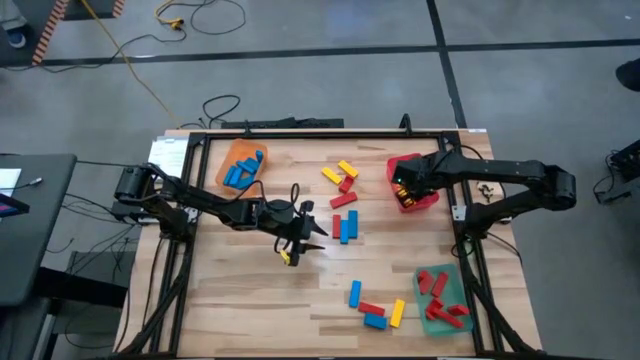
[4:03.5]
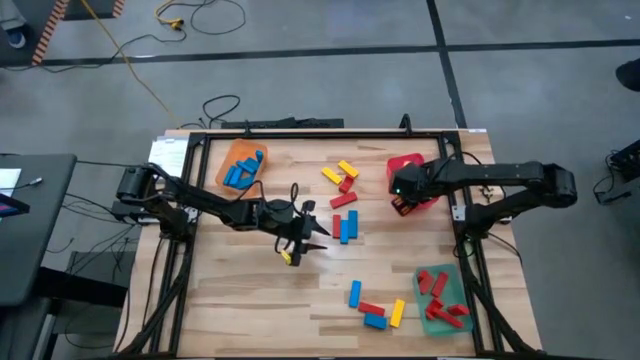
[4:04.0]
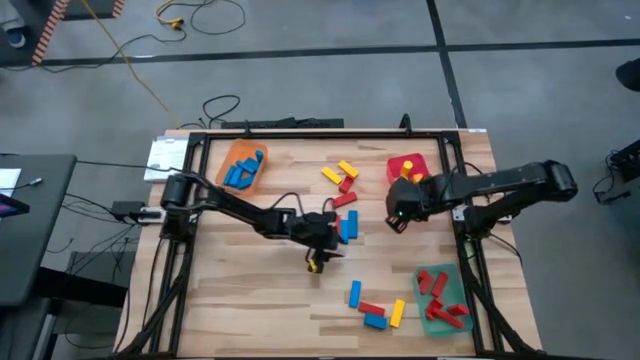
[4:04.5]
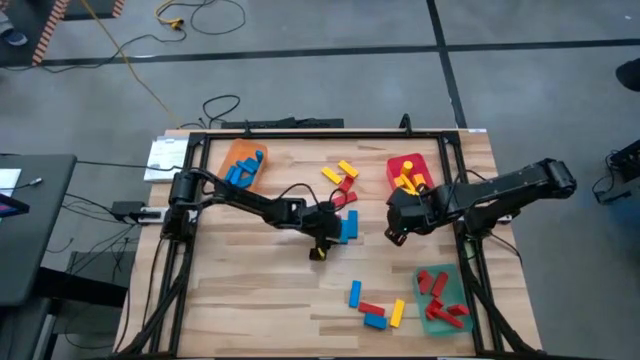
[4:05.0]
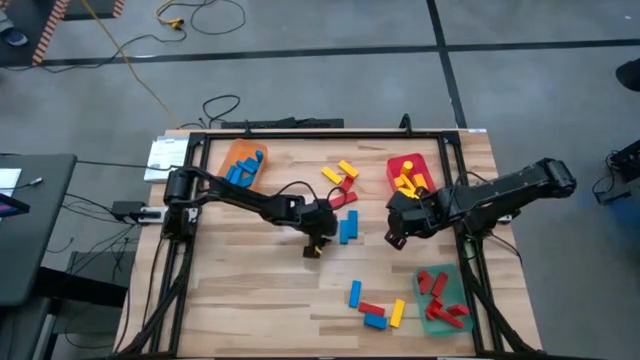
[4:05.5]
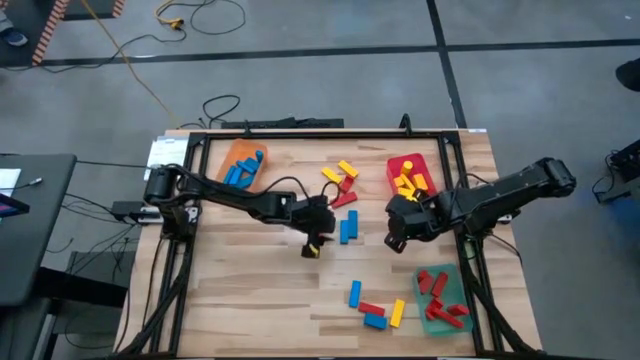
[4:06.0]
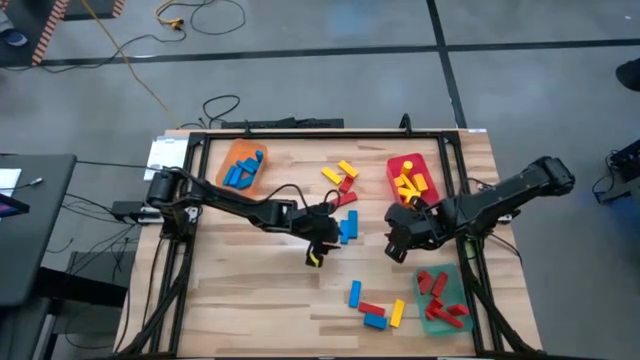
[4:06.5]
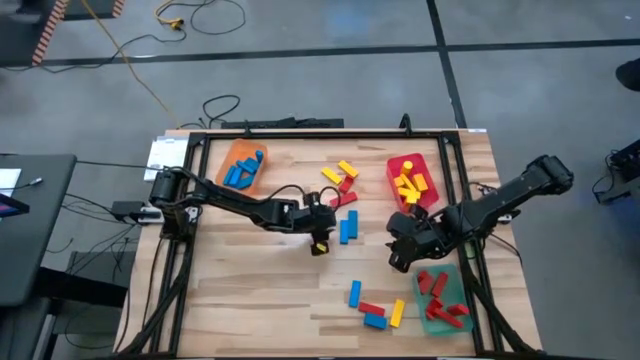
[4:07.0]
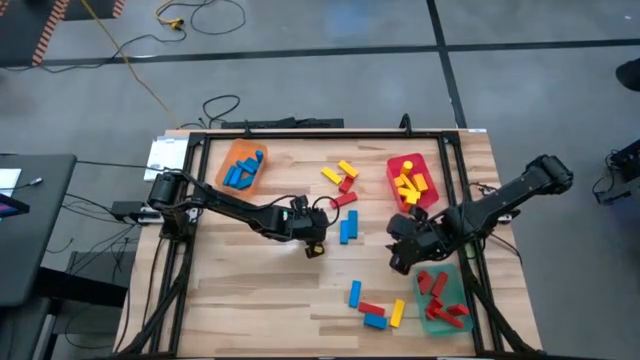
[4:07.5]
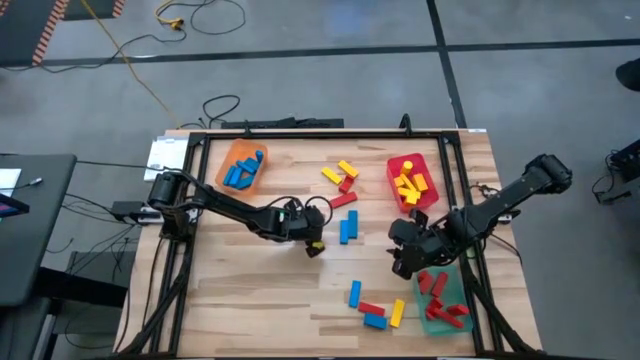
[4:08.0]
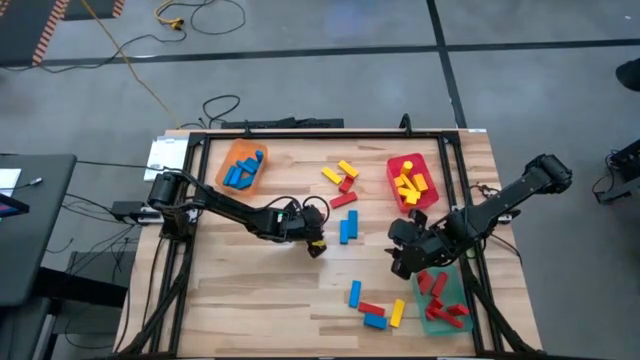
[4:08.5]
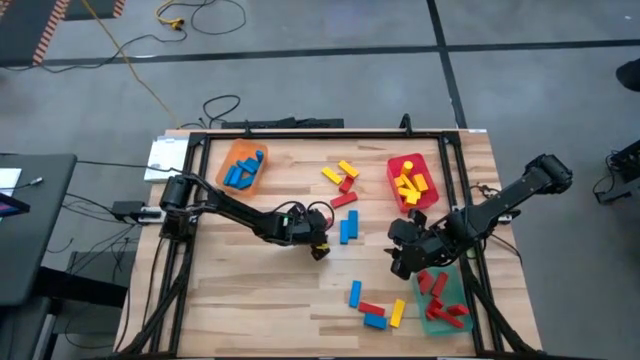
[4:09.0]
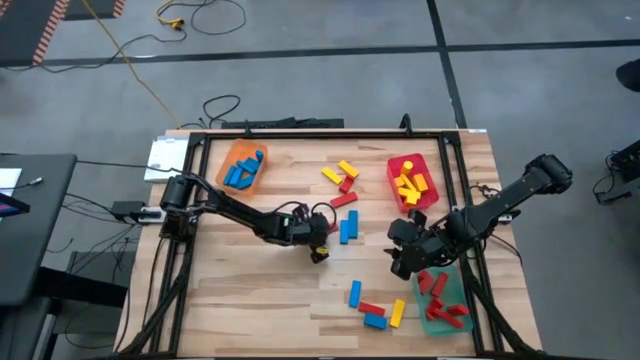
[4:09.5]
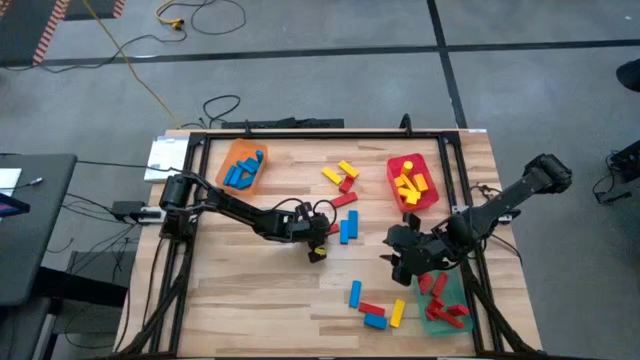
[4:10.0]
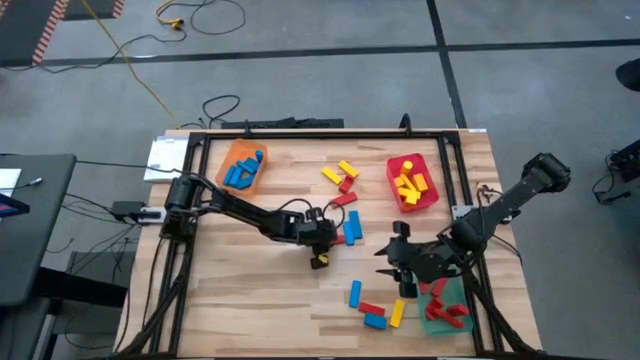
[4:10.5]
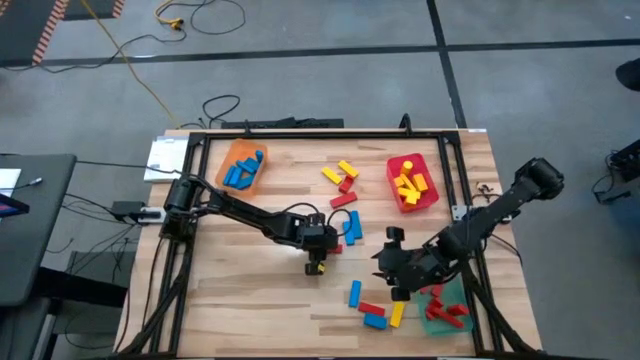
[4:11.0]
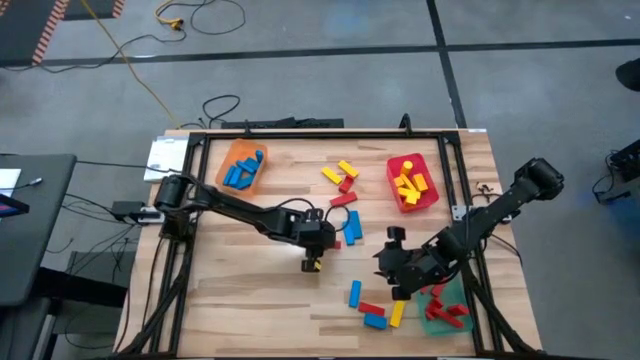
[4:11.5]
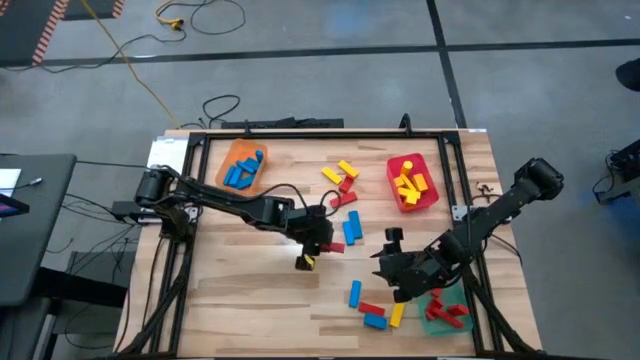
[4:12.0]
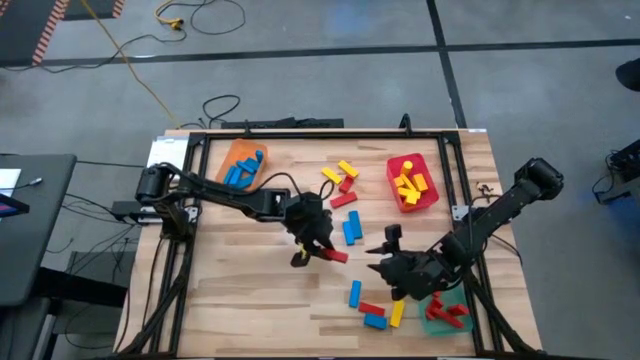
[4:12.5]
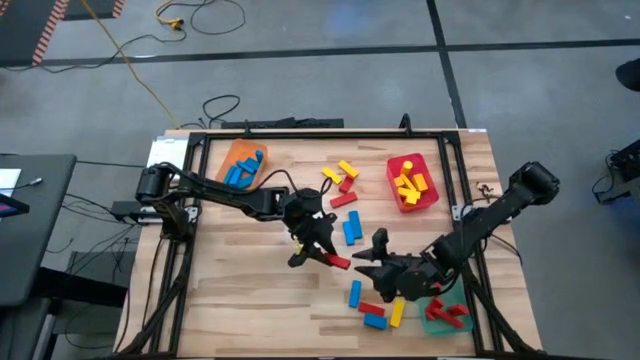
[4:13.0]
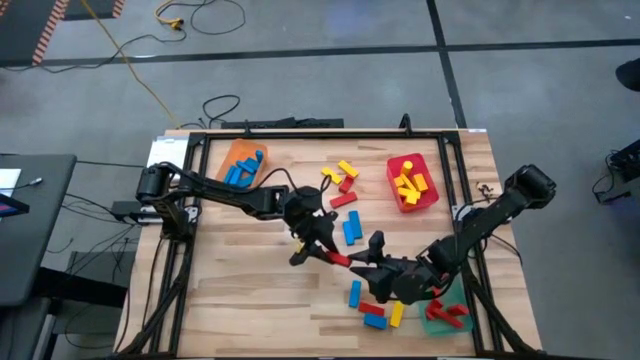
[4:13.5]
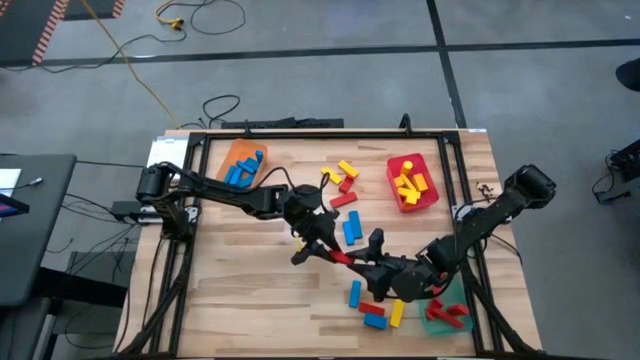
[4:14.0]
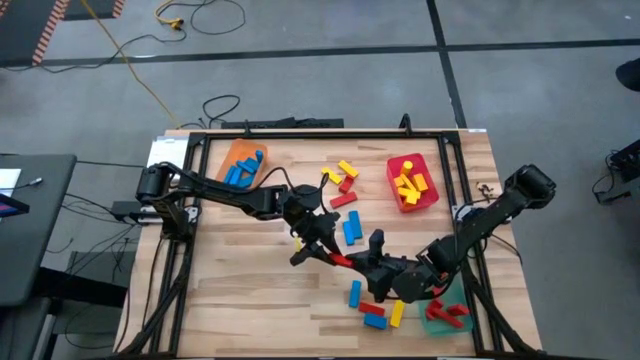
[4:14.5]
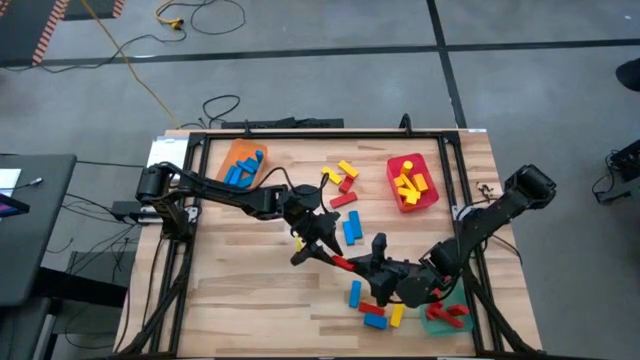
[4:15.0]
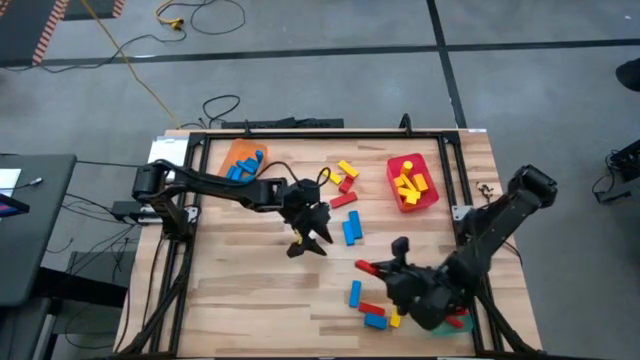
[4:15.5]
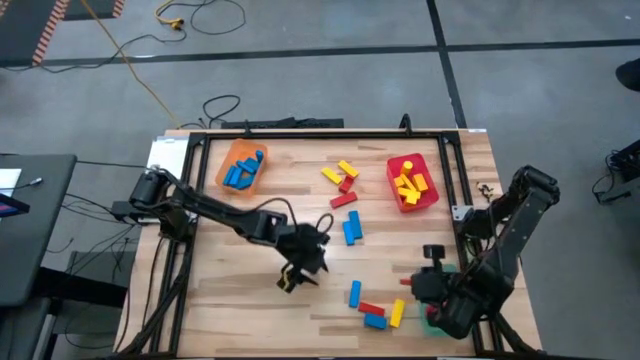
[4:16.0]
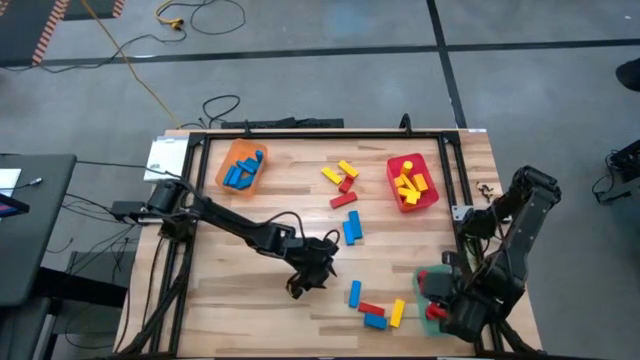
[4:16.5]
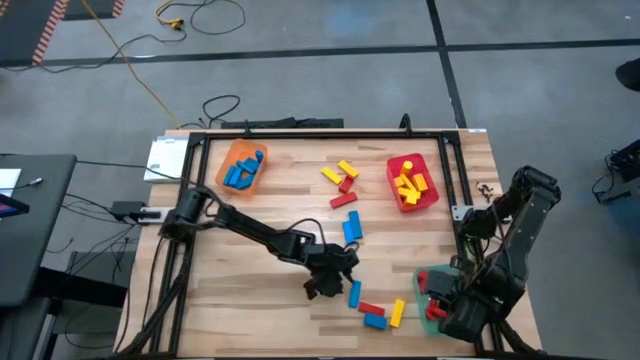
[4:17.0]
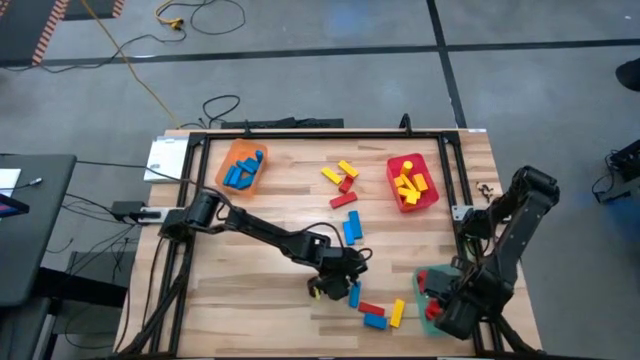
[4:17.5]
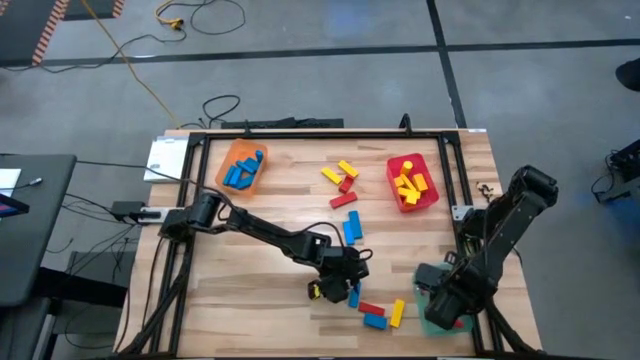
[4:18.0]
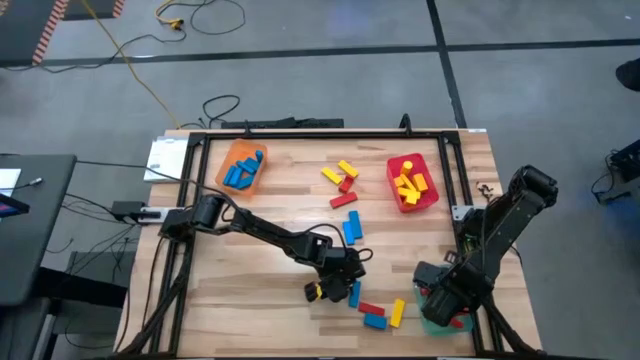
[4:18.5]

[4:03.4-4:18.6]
Task: Sort blocks
Put the red rectangle block into the green bin

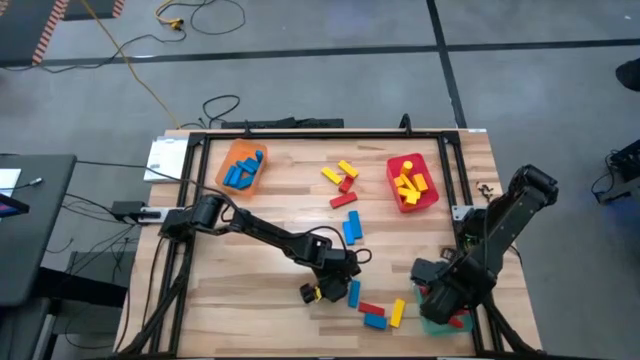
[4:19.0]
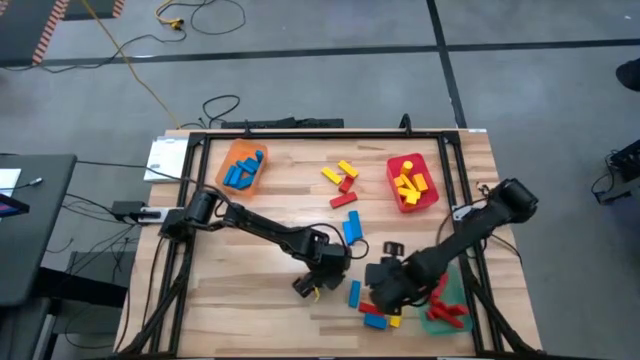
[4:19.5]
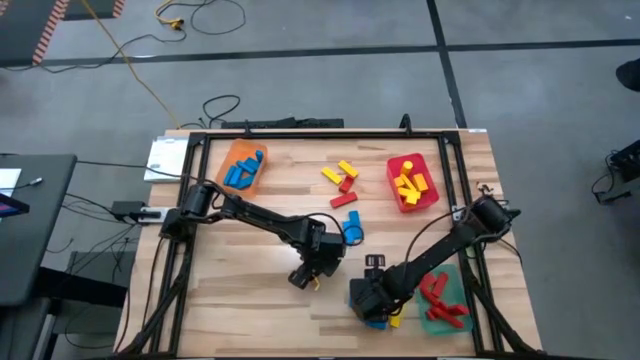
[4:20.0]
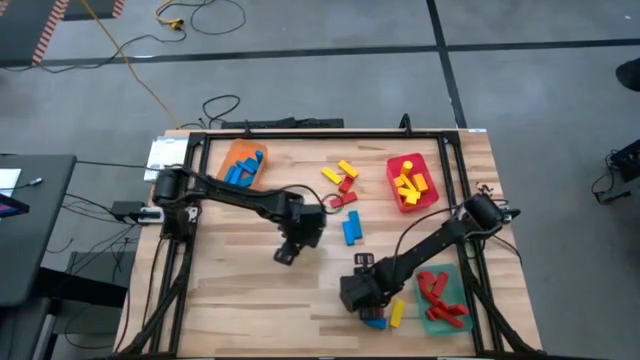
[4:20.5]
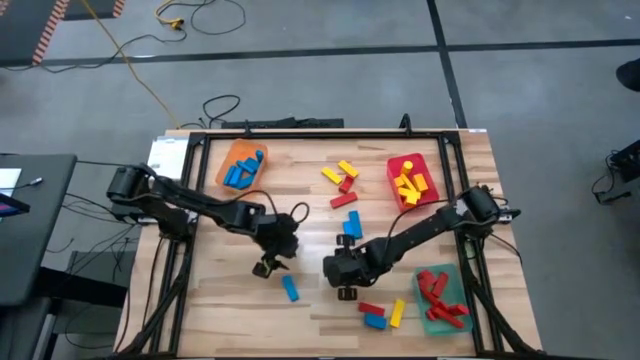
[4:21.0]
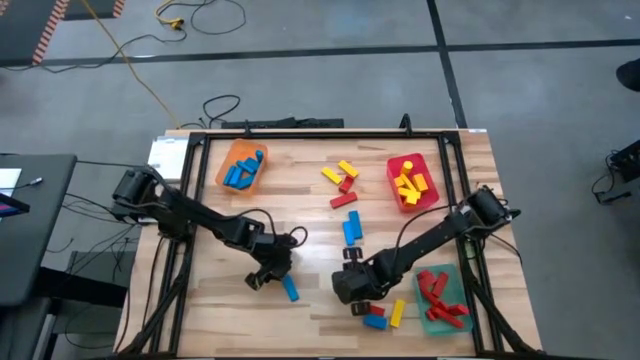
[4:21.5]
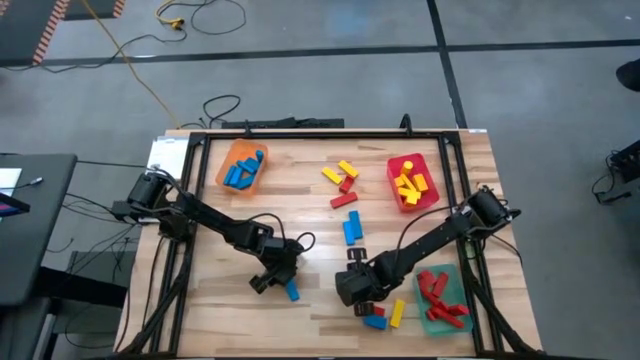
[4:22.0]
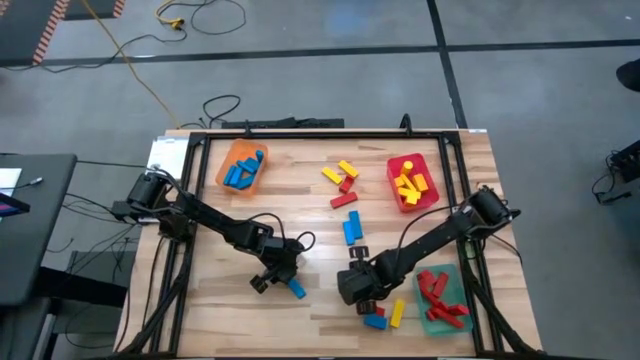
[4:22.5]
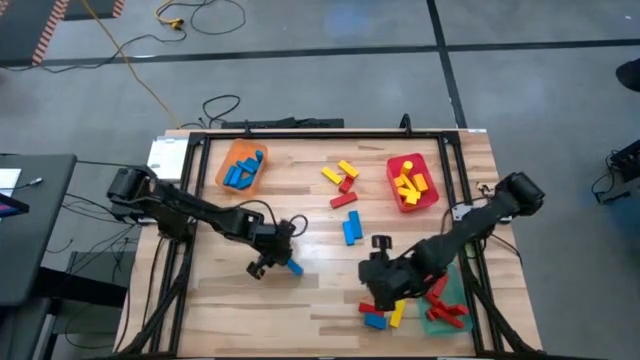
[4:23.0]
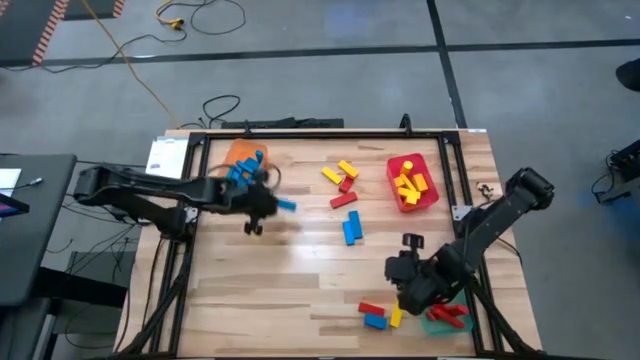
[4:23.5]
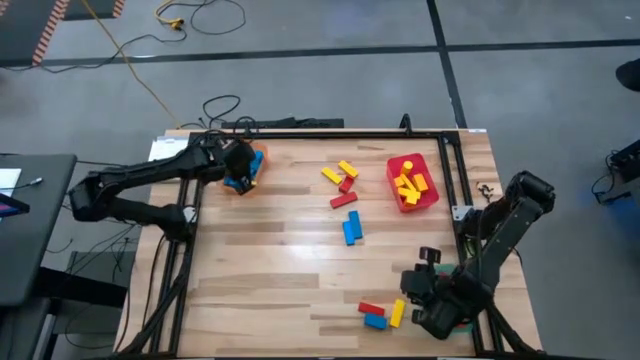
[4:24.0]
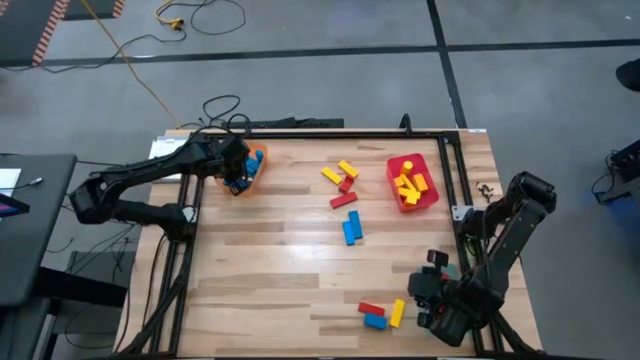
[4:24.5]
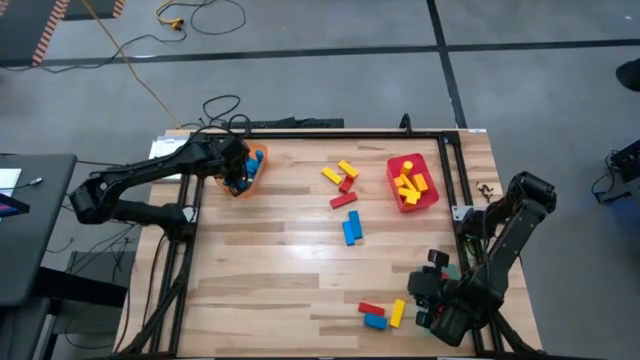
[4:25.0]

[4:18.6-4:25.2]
Put the blue rectangle block into the orange bin

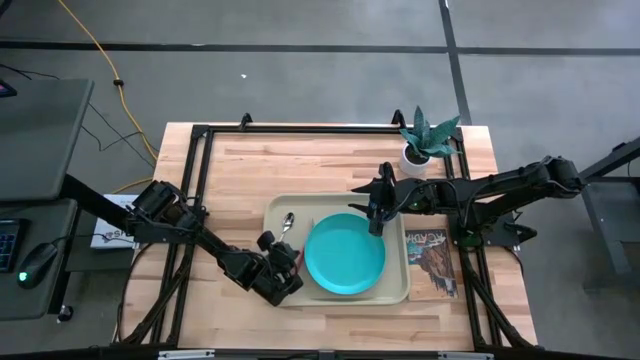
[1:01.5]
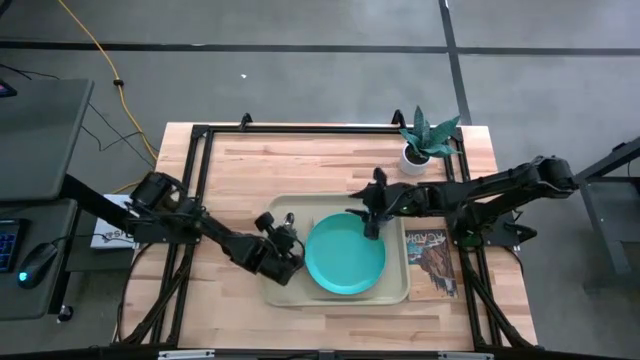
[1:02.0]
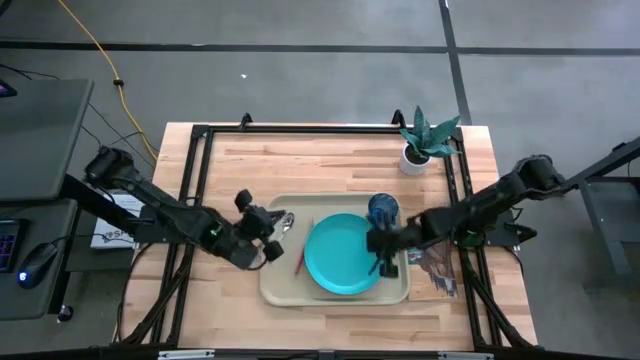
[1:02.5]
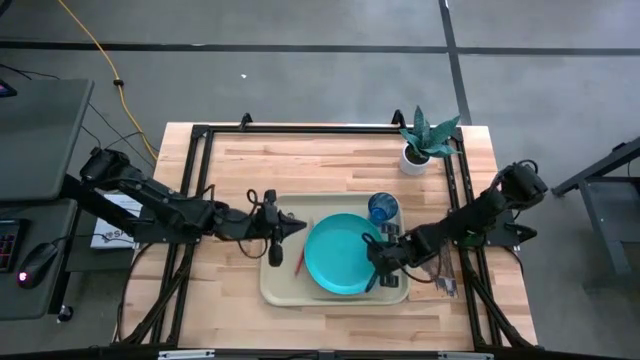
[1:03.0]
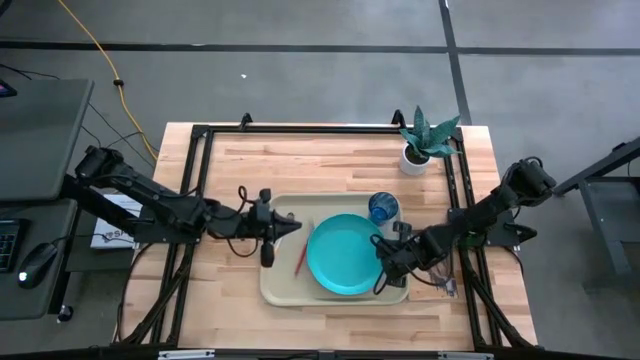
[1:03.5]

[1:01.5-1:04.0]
Task: Pick and place plate/cup/fork/spoon on tray
Adjust the blue plate on the gray serving tray
